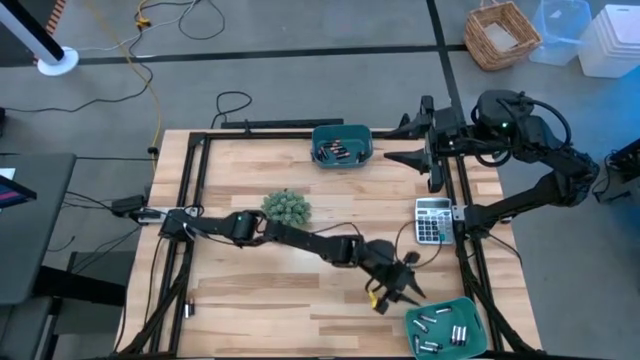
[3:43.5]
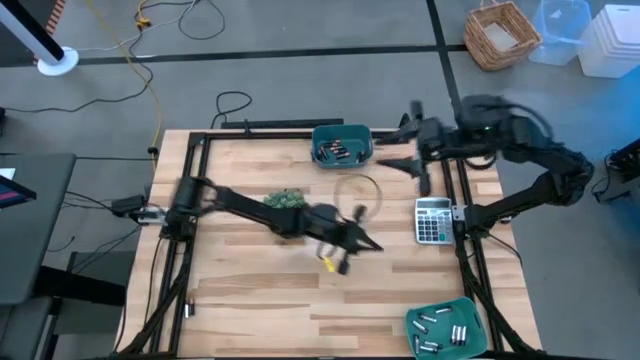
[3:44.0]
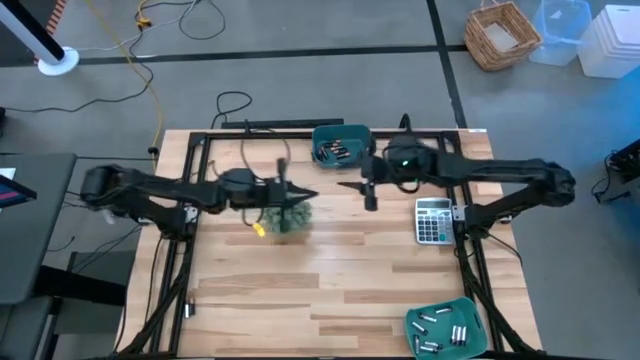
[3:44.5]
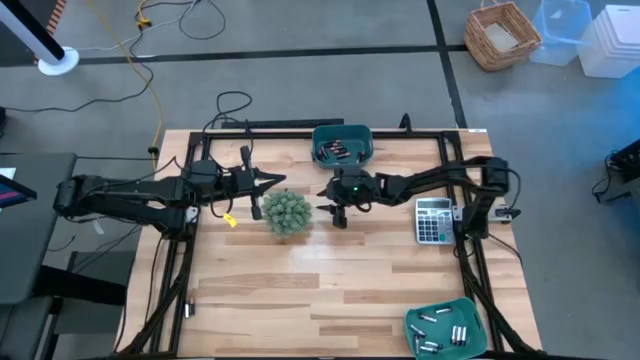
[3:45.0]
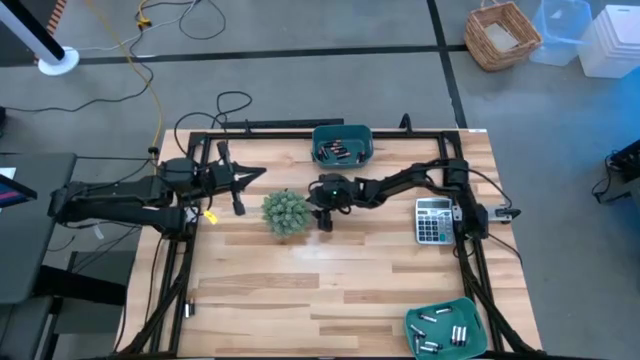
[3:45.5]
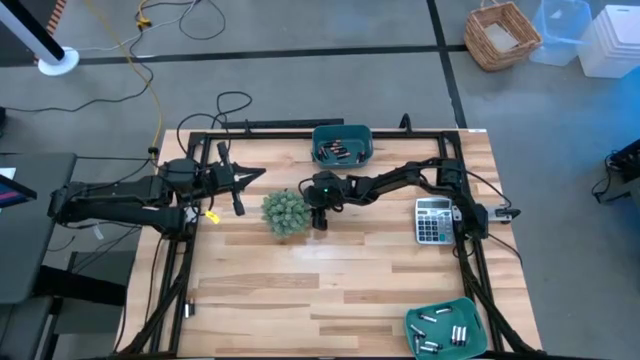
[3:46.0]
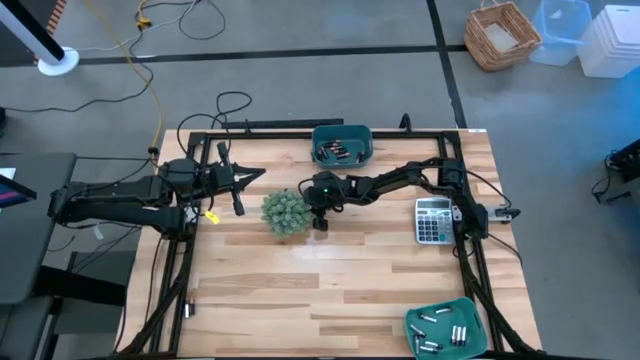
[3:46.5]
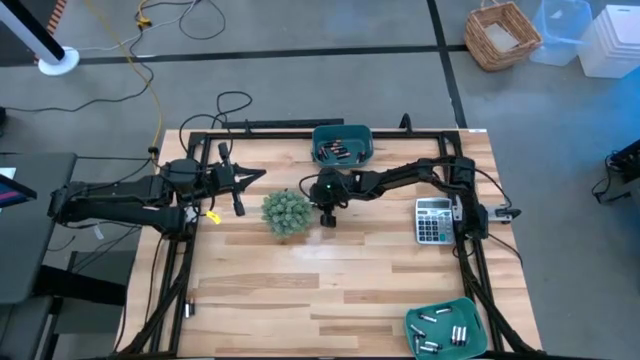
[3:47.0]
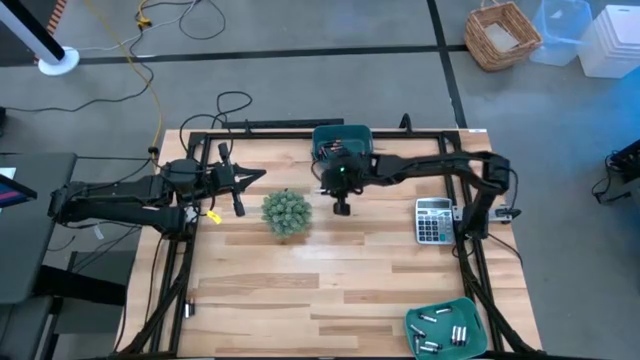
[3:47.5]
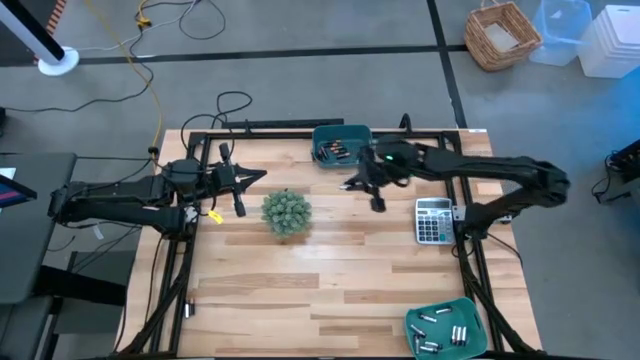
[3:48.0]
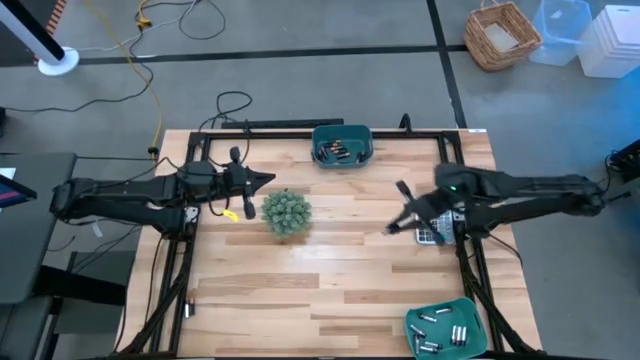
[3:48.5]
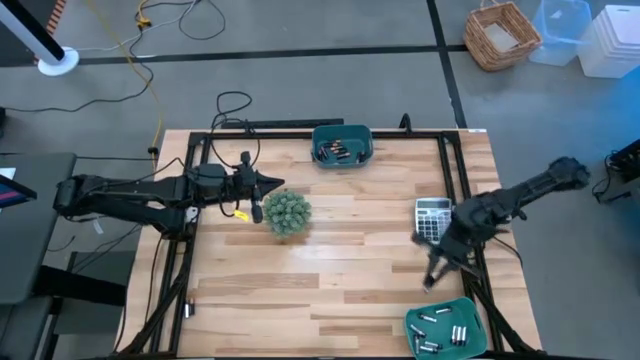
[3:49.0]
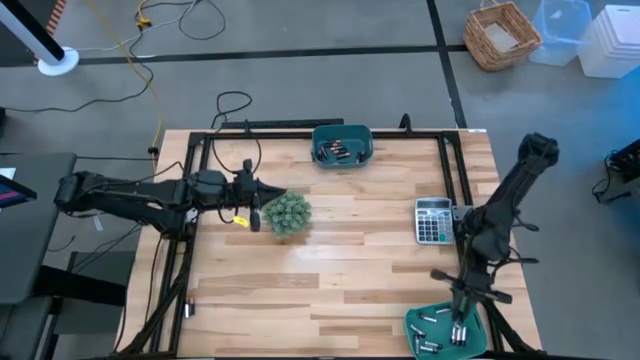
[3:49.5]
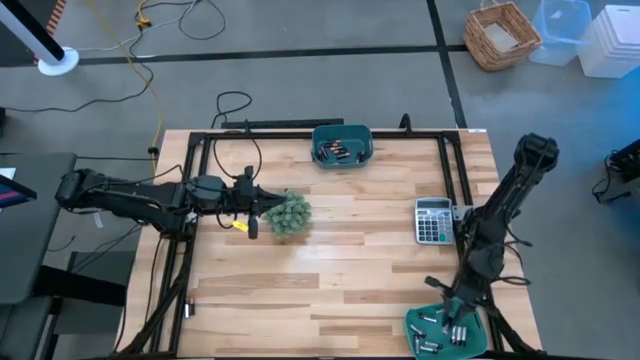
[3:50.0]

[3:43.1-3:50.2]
Task: Sort batteries
Put the silver battery into the green bin

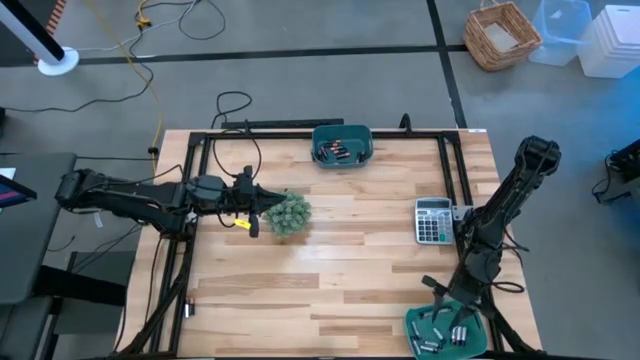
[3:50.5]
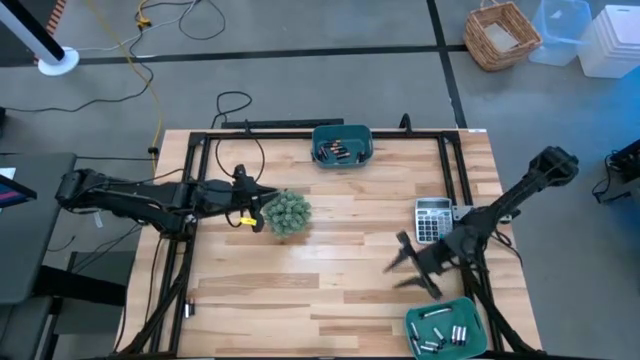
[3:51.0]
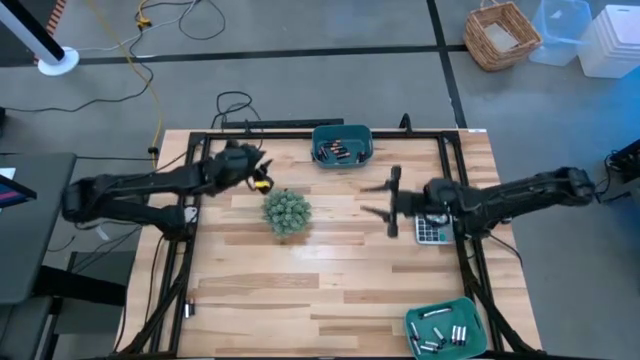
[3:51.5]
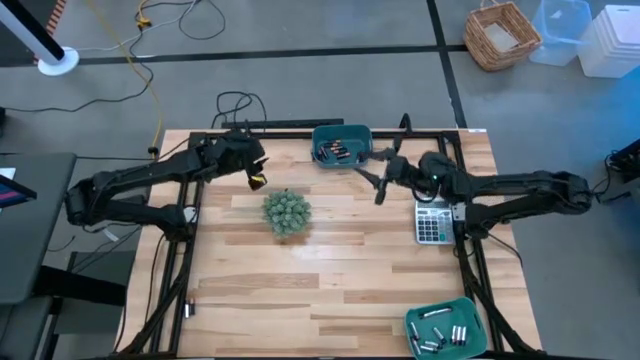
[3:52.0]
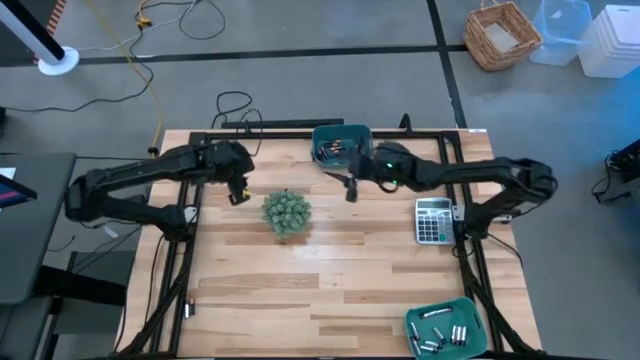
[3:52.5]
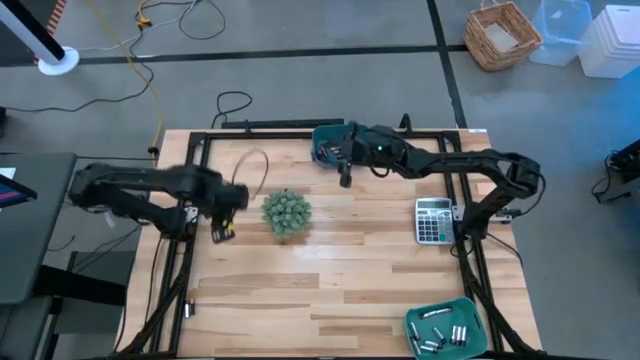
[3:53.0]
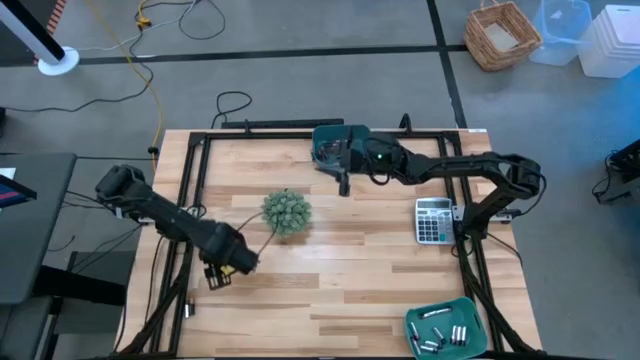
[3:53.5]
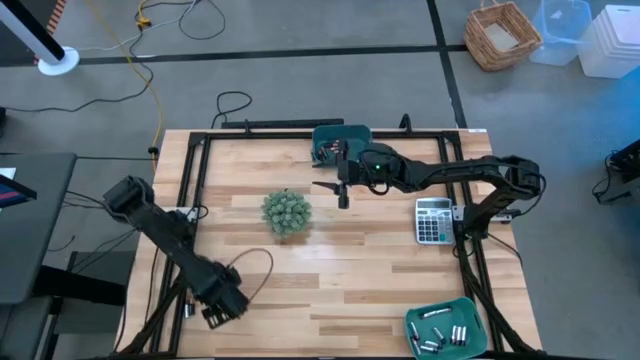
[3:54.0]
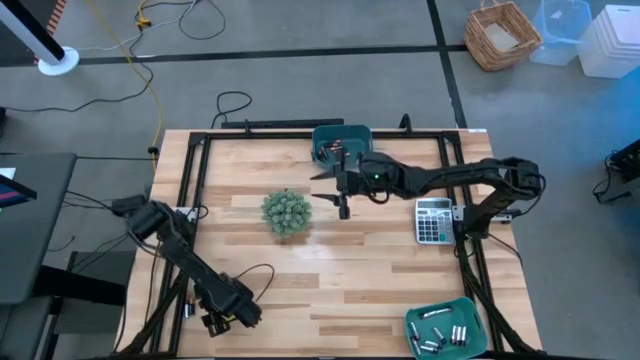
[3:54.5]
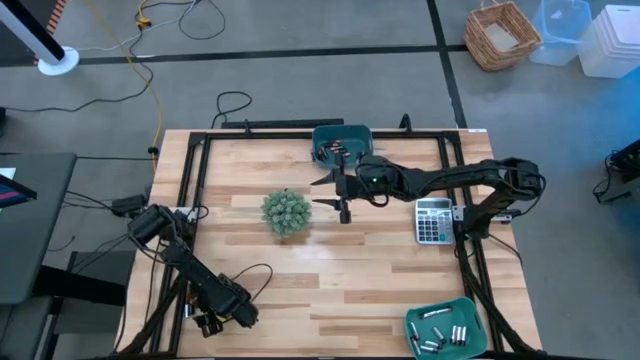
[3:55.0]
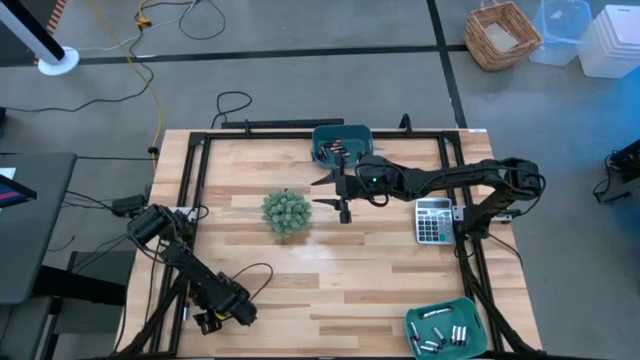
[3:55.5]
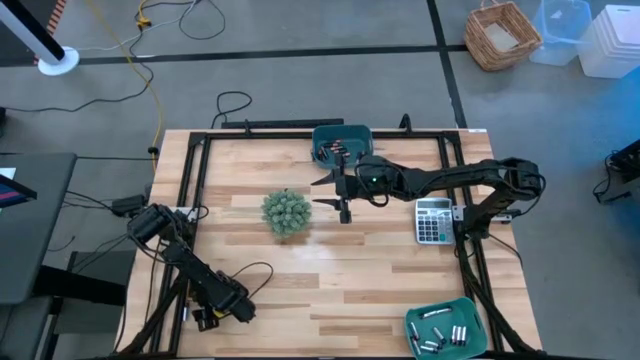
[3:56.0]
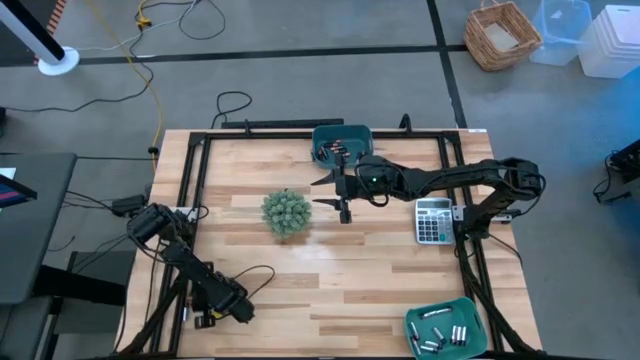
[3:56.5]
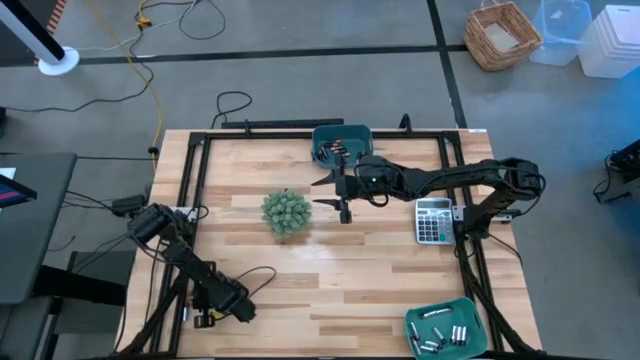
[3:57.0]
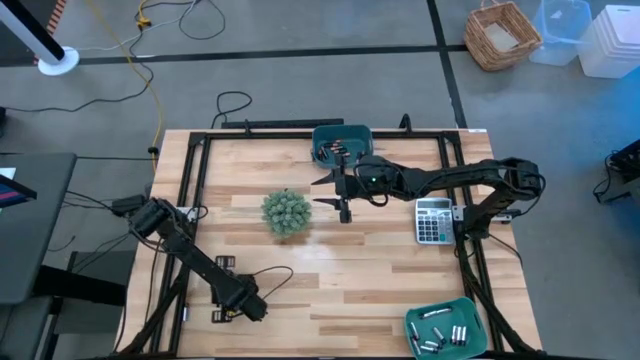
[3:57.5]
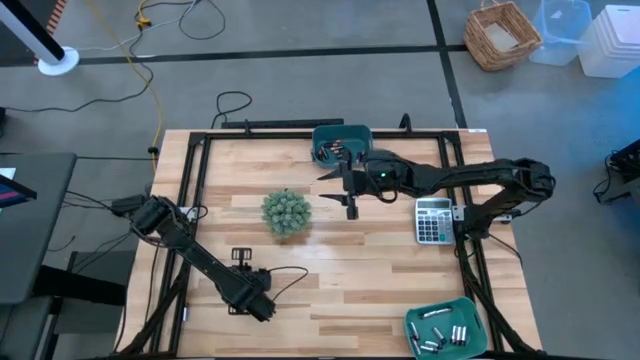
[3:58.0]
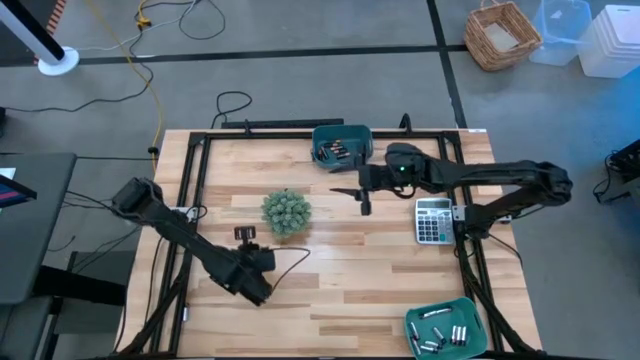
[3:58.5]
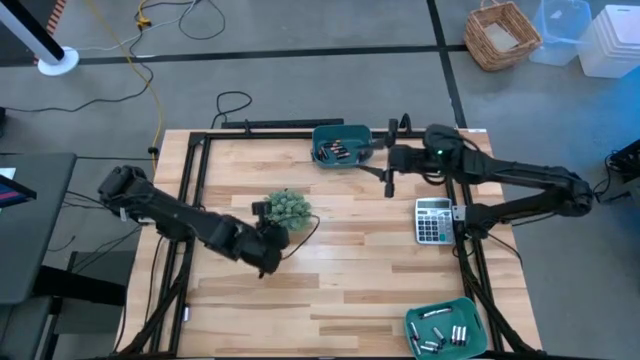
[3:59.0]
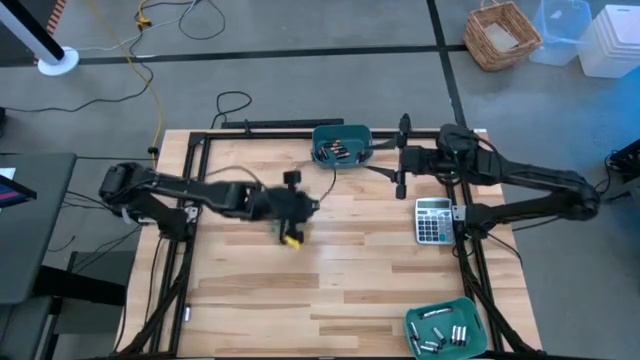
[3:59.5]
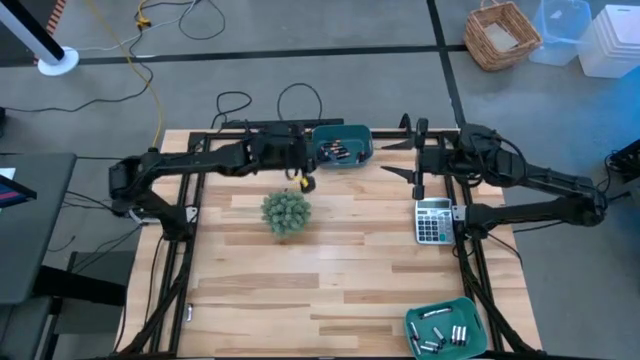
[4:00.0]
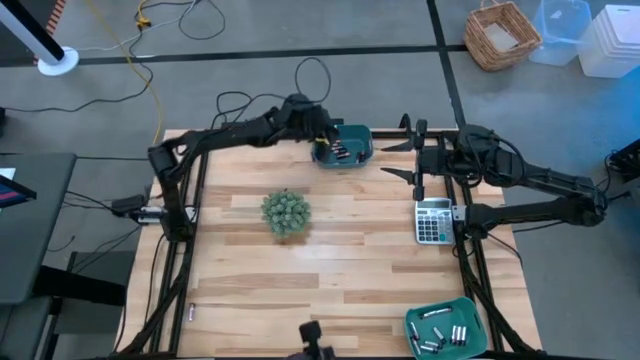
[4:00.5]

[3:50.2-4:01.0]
Put the black battery into the blue bin

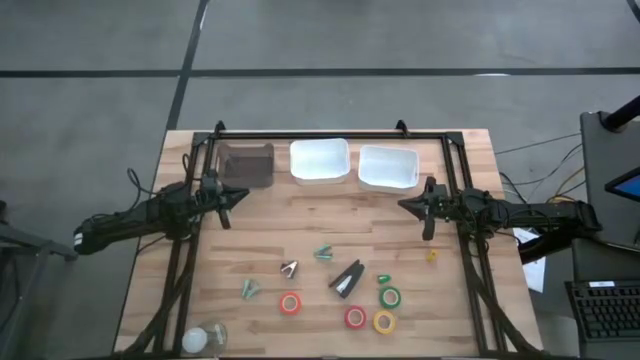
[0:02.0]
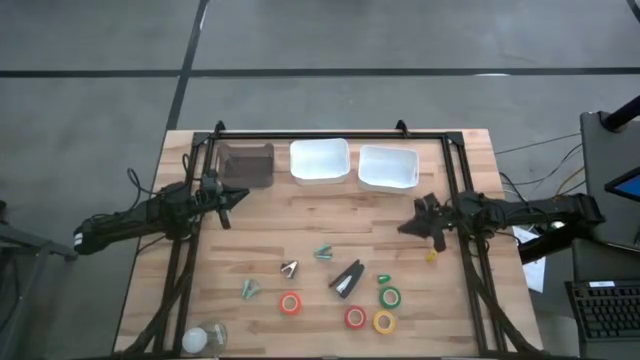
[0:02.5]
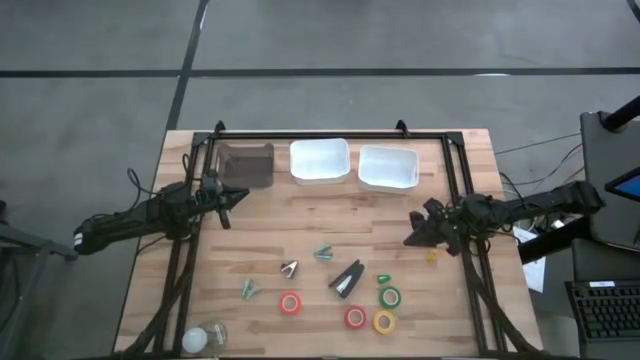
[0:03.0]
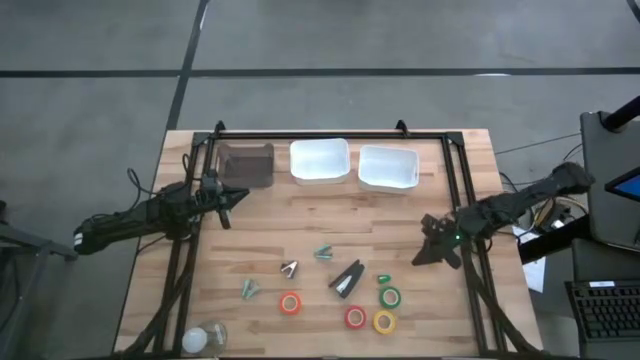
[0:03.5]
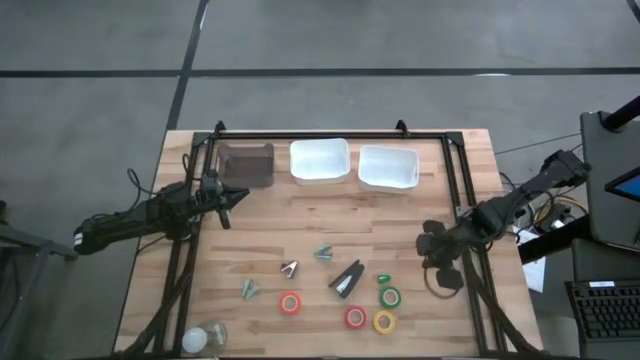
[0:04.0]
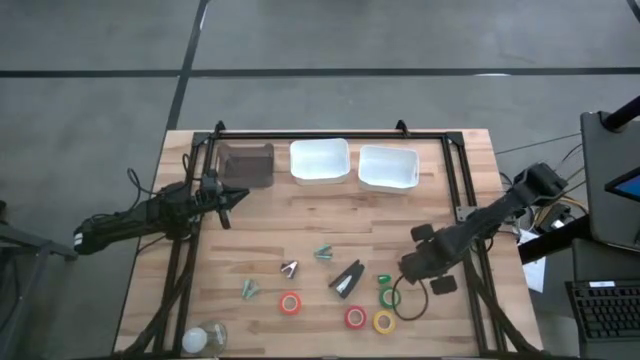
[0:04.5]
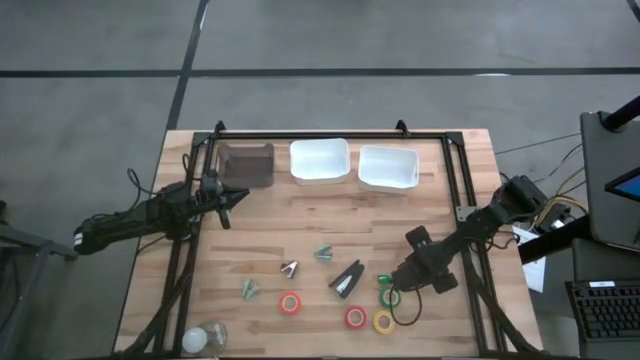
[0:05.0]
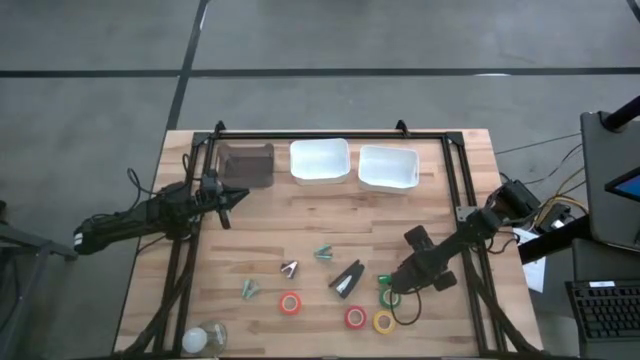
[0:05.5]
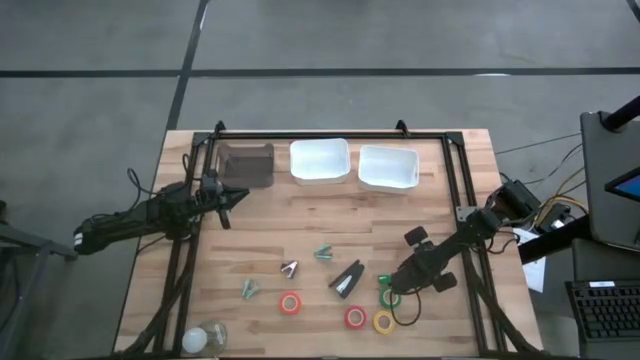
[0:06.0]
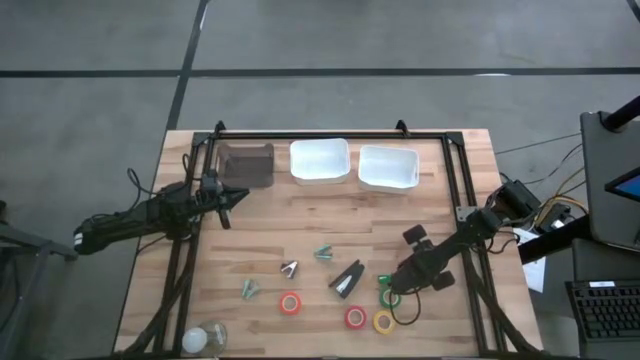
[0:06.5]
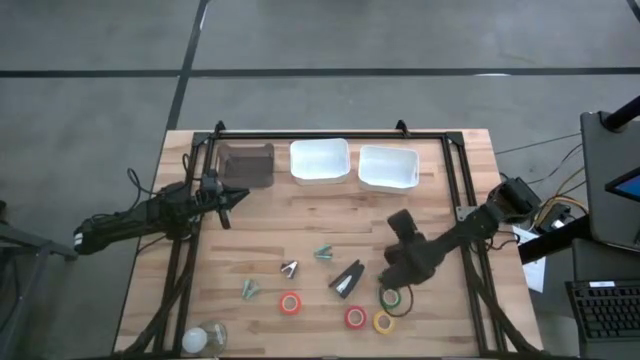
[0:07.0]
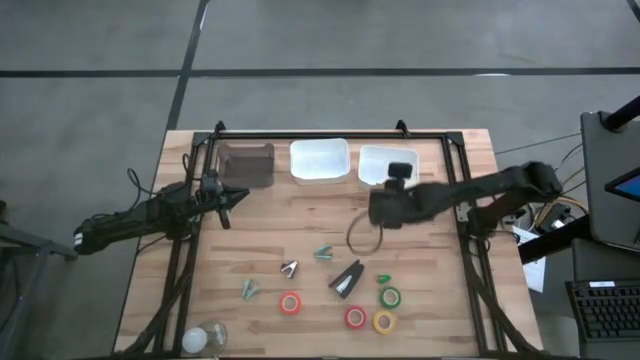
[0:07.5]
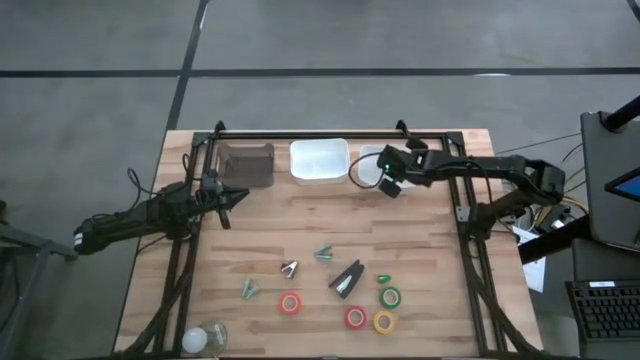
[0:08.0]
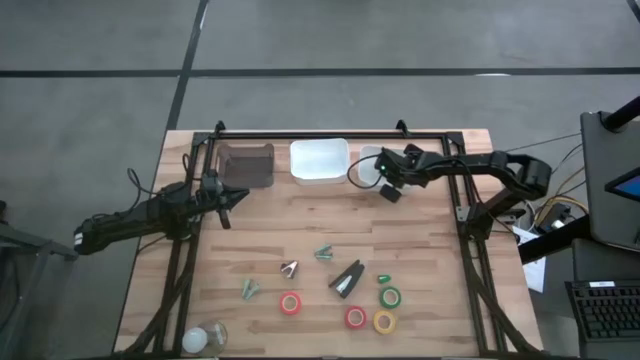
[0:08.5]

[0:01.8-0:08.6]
Task: Pick and place Stapler, Stapler remover, tape
Put the yellow stapler into the right white bin
